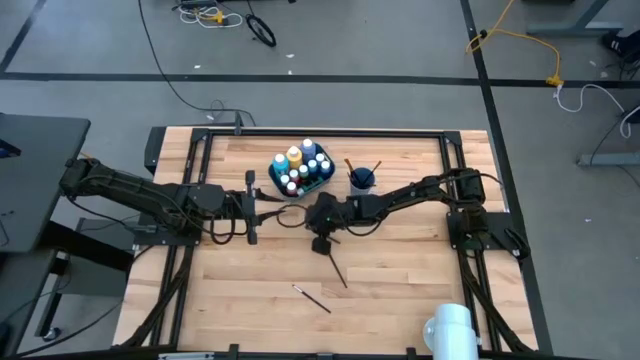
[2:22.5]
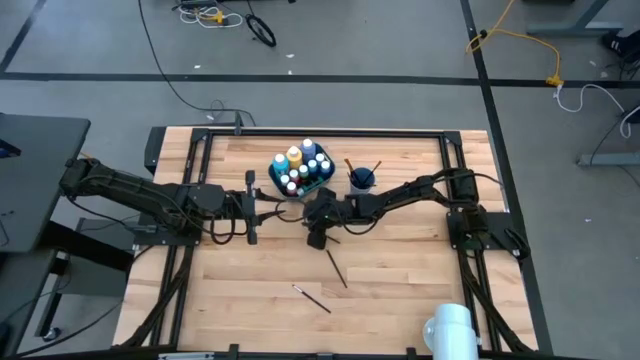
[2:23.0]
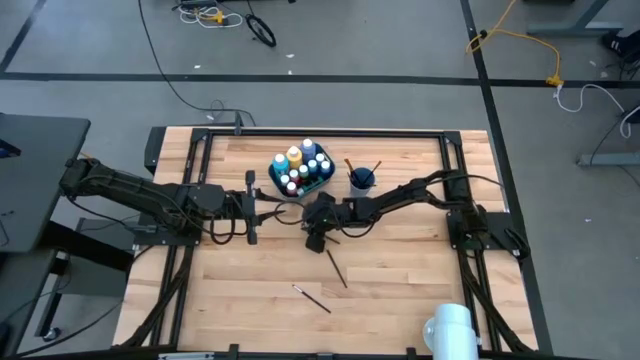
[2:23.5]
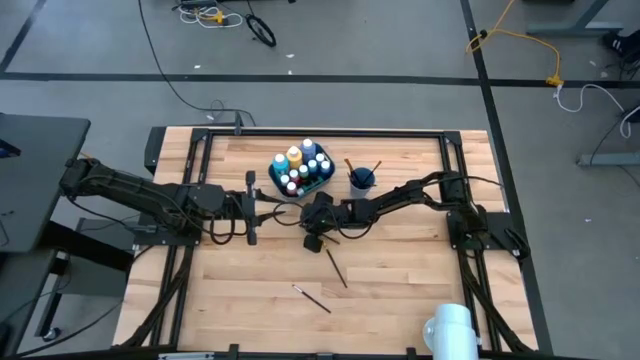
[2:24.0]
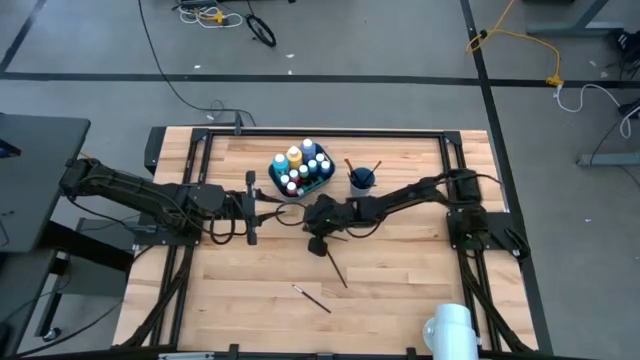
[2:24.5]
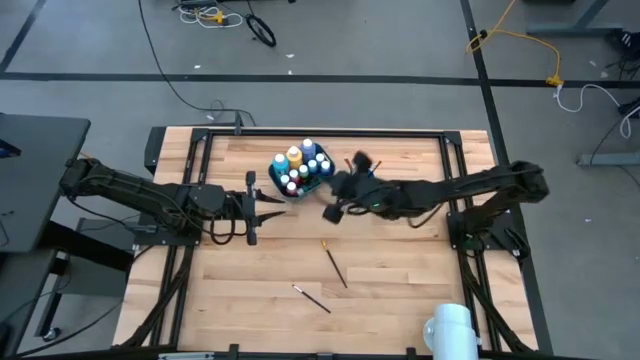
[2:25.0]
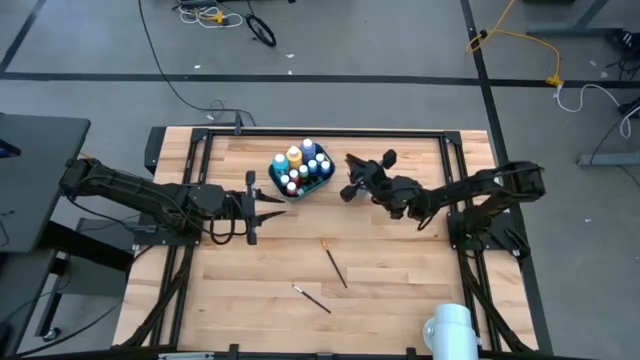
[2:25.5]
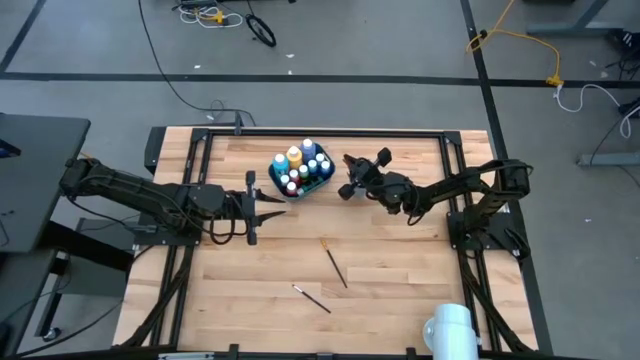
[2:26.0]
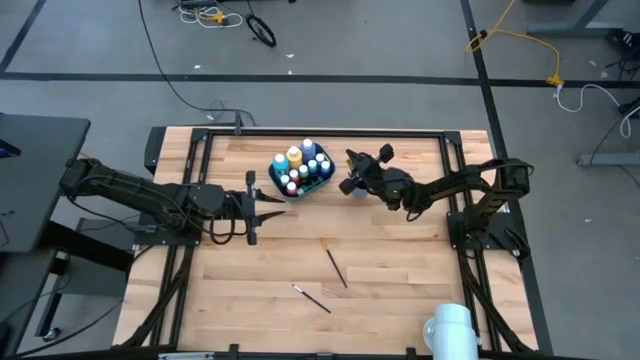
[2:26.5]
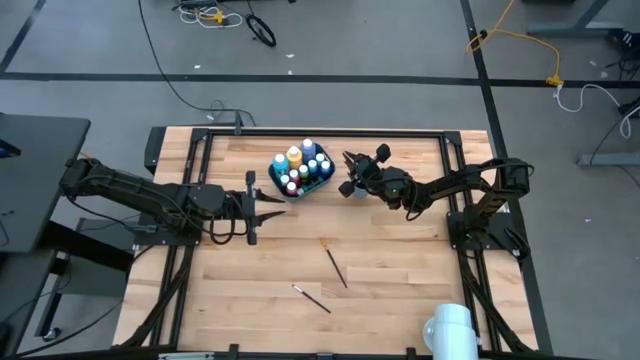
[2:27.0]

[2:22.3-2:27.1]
Task: Pick & Place Paint Supplies
Put the silver paint brush into the blue cup

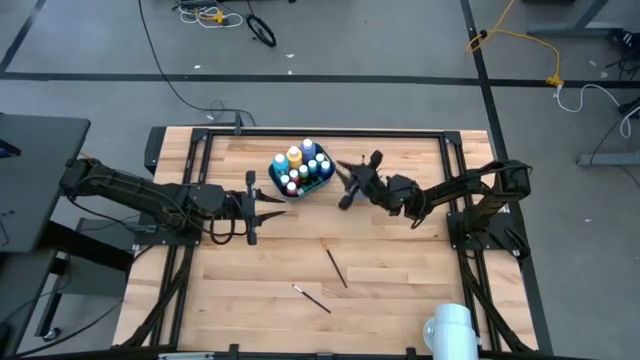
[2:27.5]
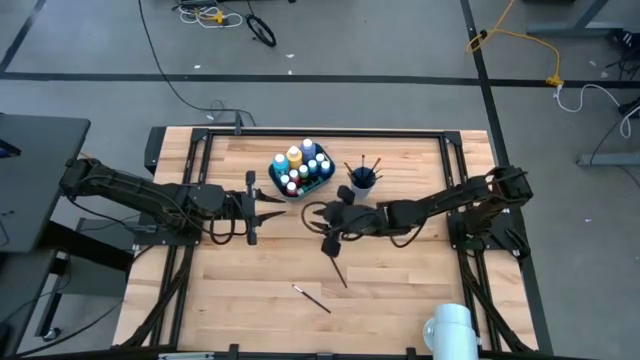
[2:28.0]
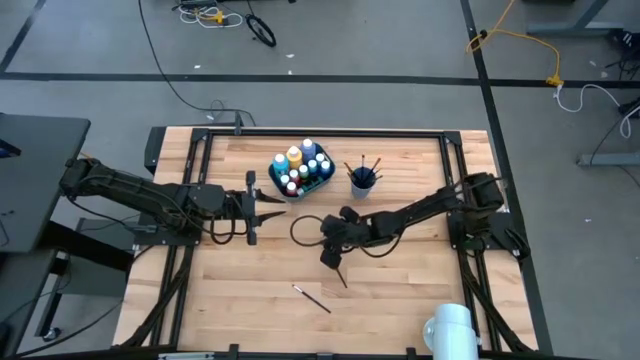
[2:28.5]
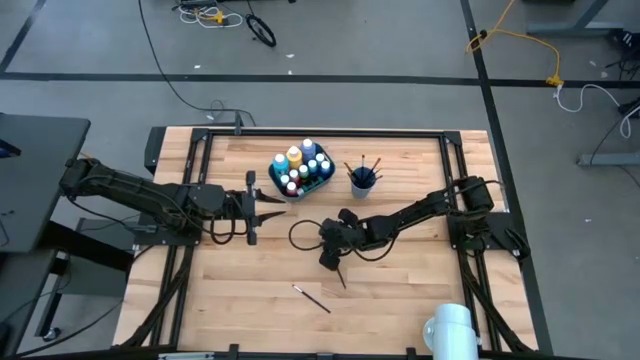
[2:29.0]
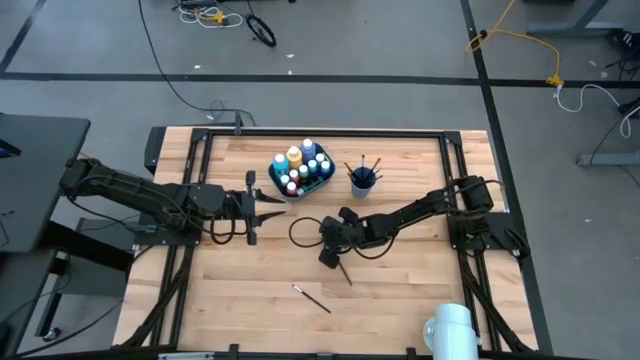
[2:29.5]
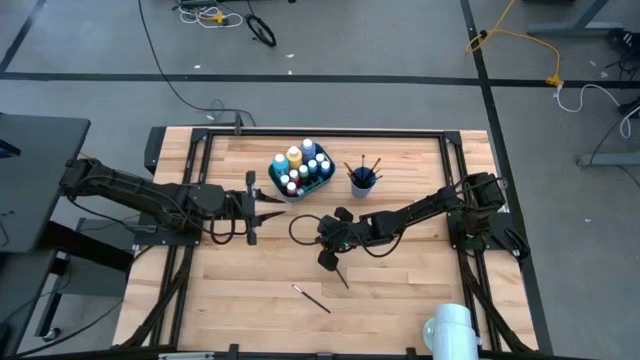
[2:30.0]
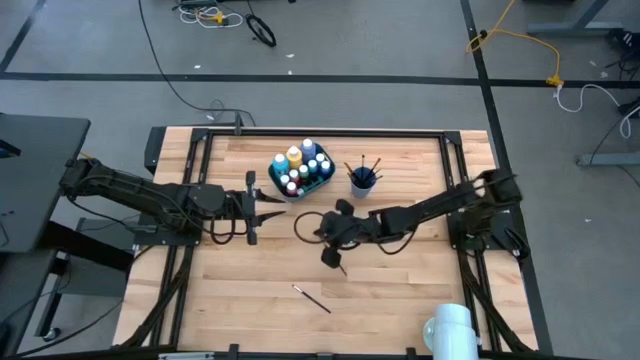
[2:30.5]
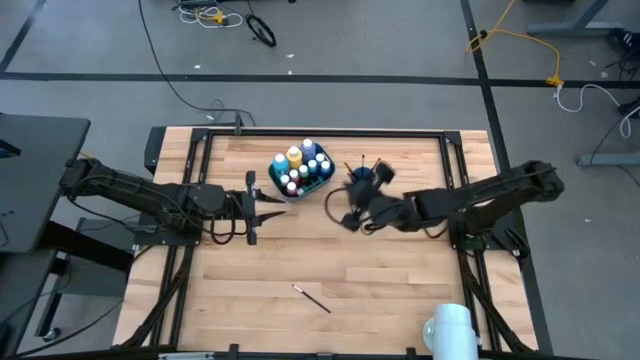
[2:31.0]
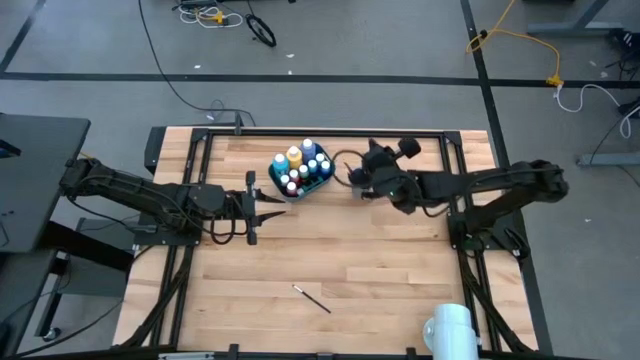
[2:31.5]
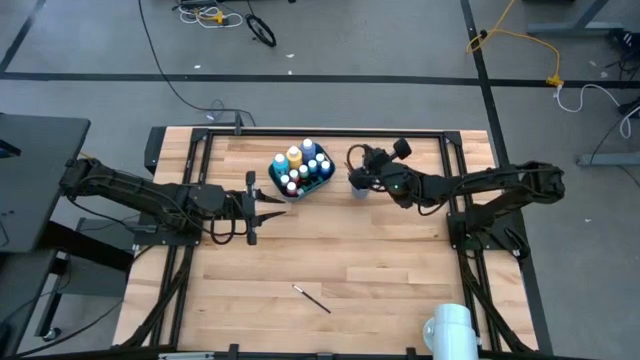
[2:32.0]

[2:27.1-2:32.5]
Put the orange paint brush into the blue cup

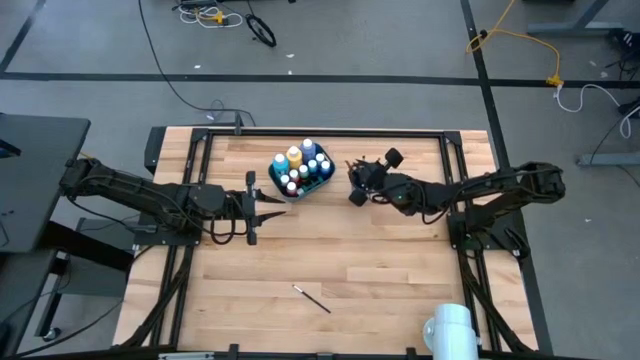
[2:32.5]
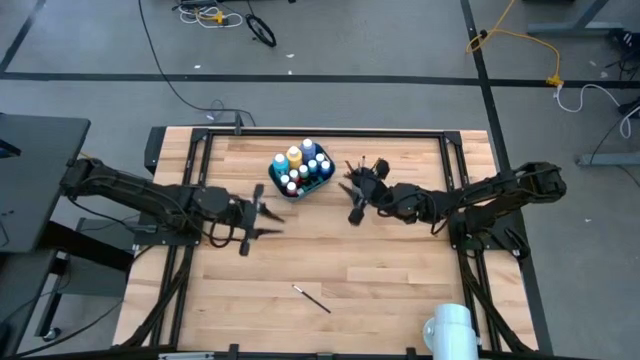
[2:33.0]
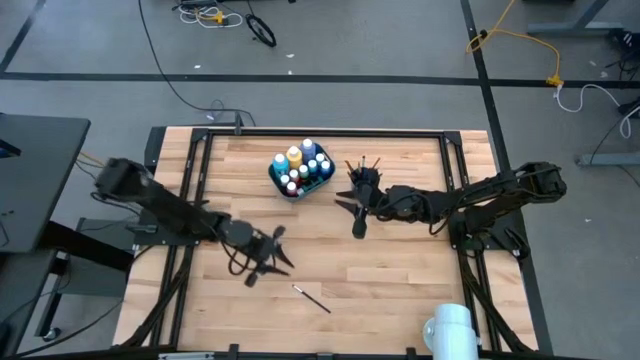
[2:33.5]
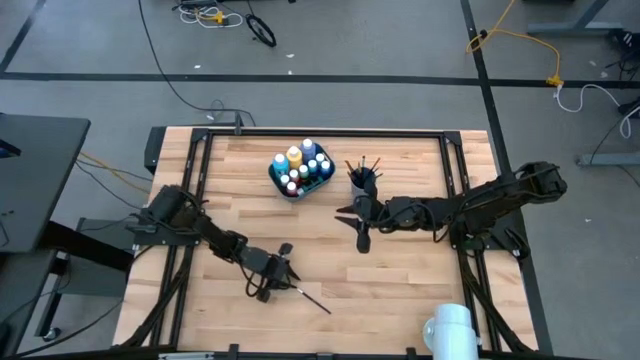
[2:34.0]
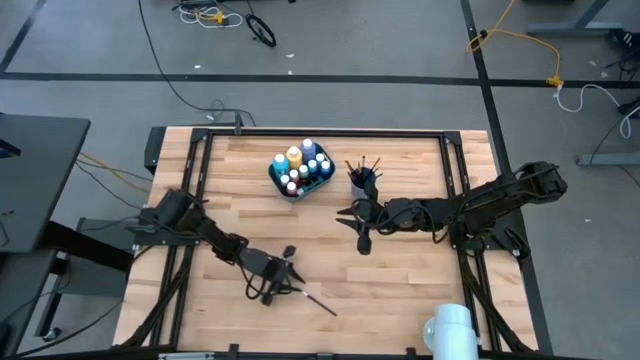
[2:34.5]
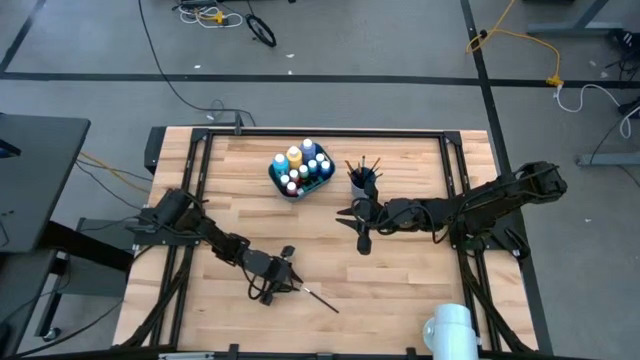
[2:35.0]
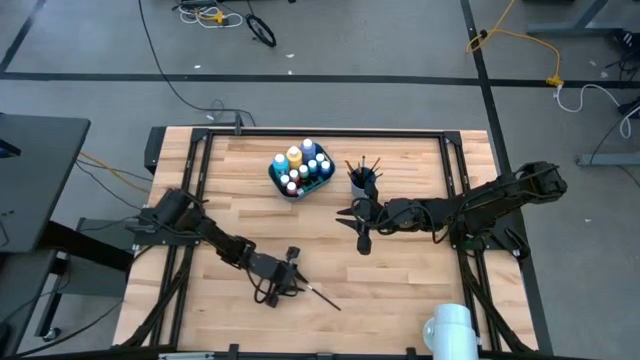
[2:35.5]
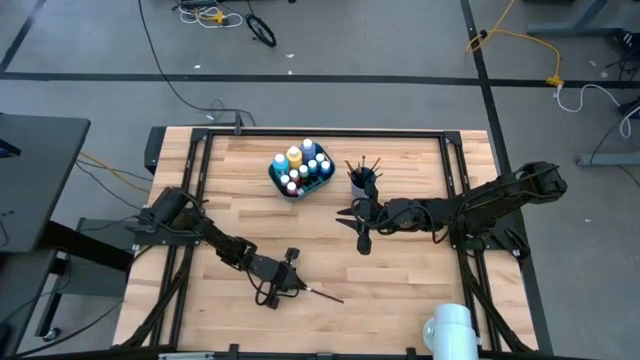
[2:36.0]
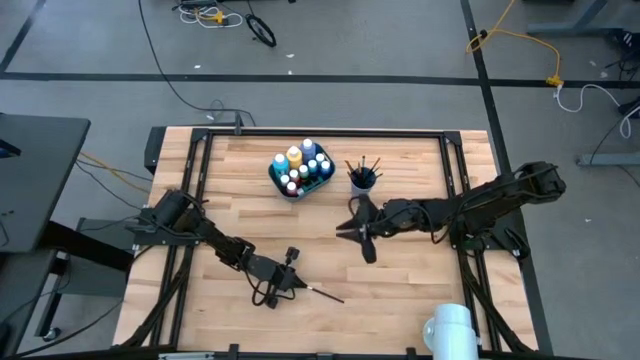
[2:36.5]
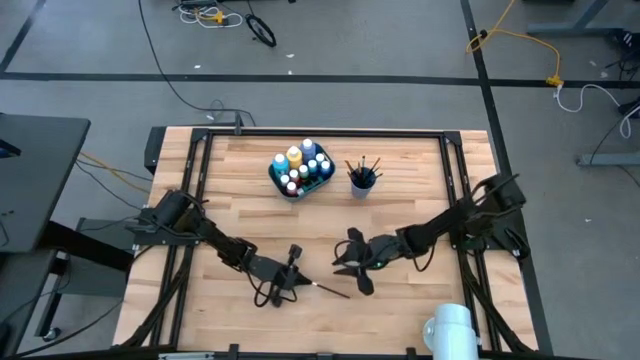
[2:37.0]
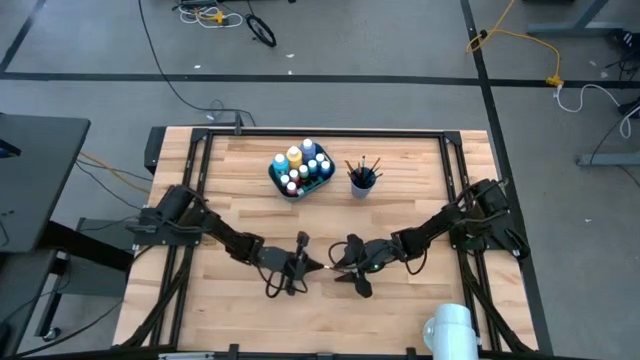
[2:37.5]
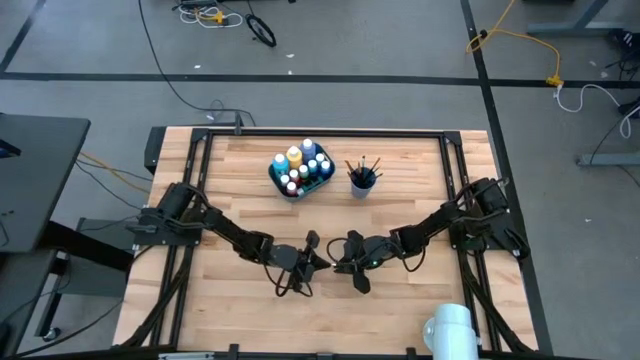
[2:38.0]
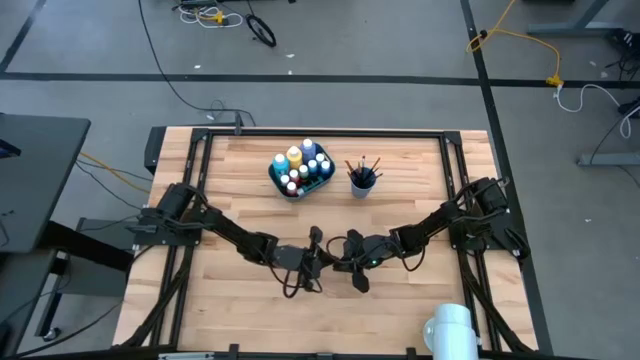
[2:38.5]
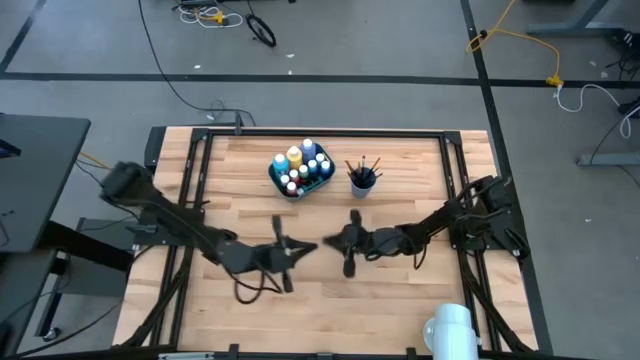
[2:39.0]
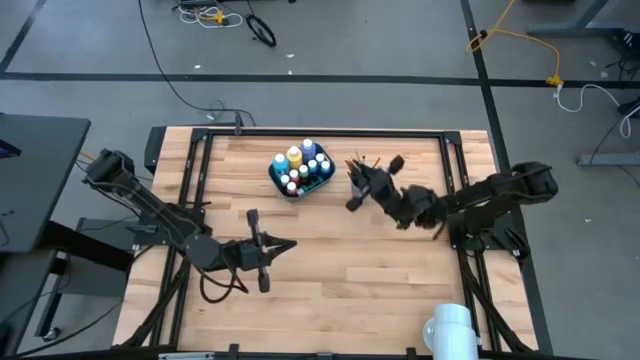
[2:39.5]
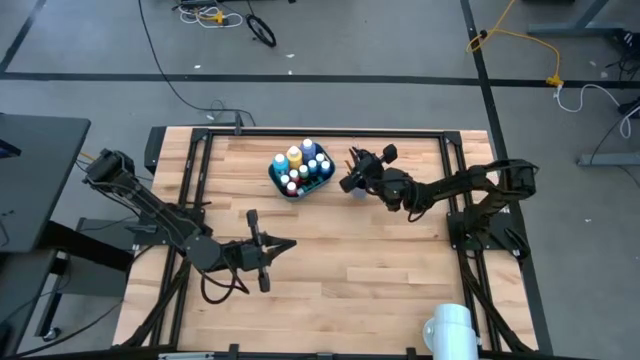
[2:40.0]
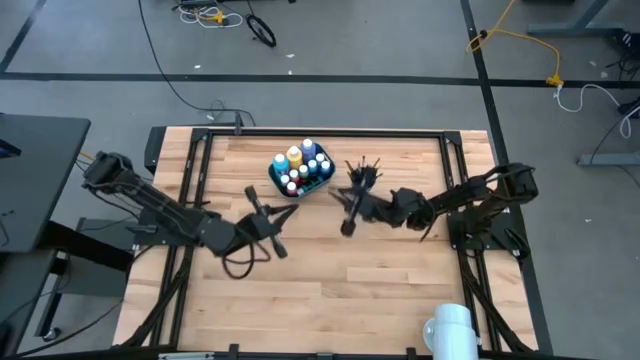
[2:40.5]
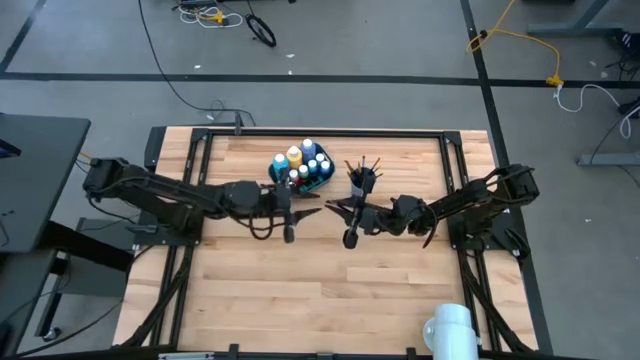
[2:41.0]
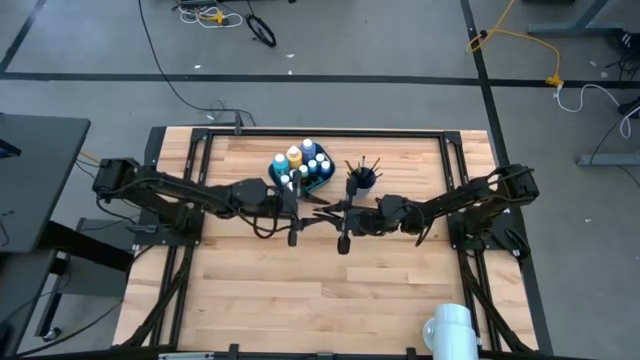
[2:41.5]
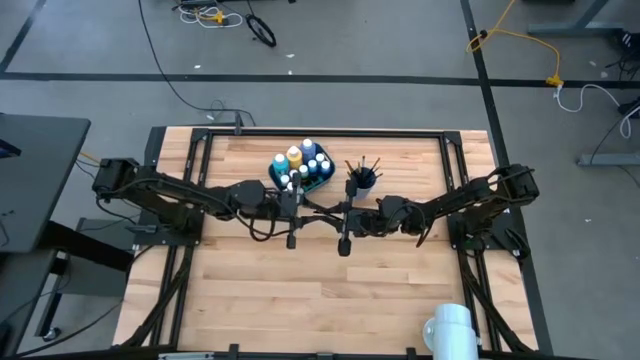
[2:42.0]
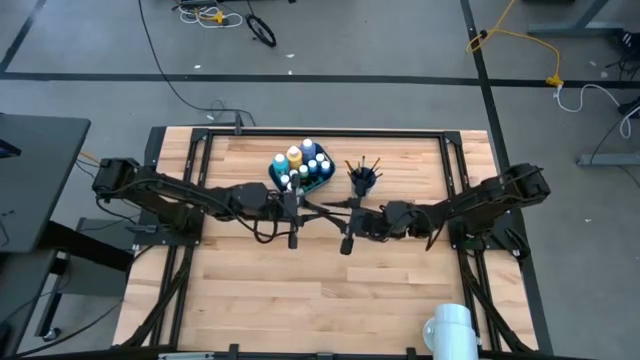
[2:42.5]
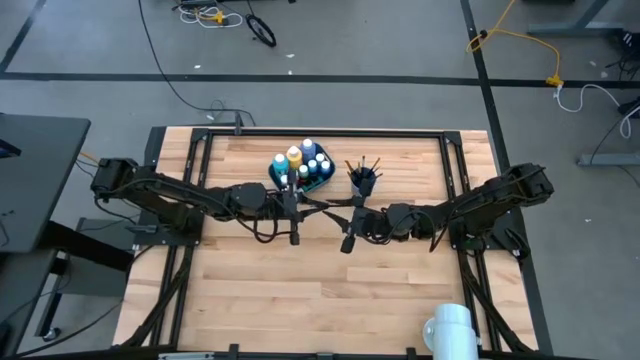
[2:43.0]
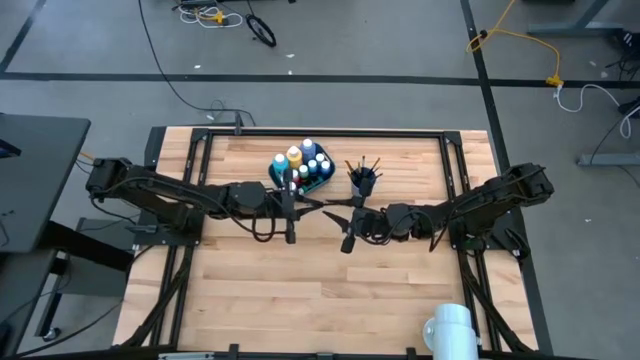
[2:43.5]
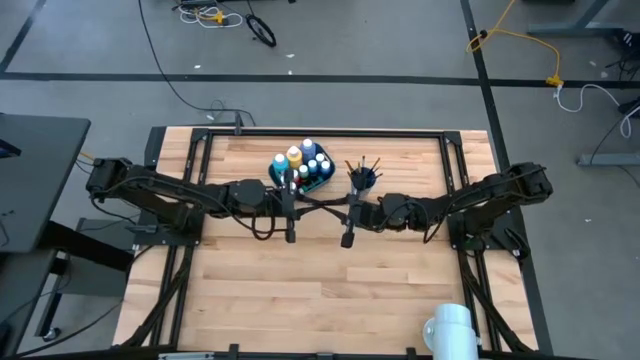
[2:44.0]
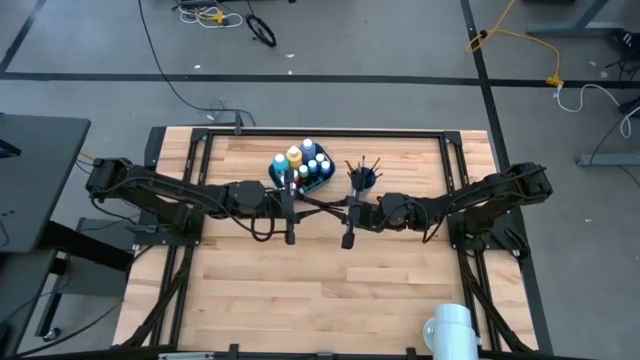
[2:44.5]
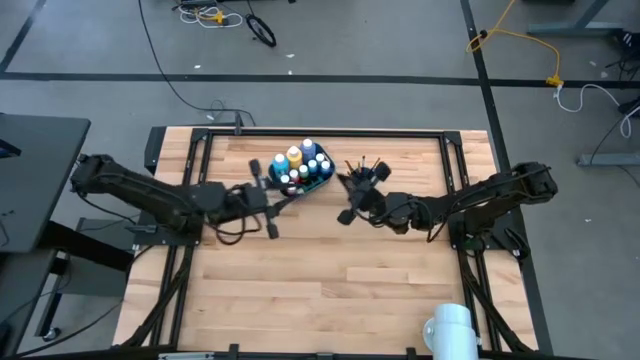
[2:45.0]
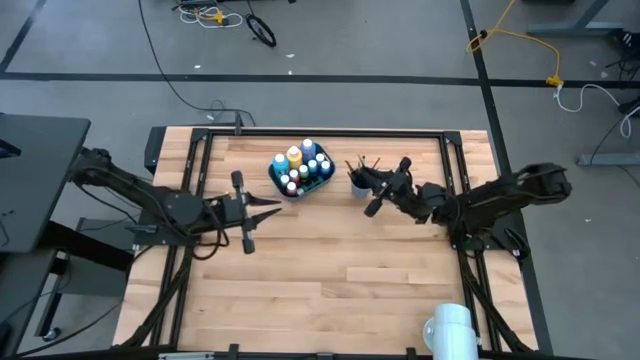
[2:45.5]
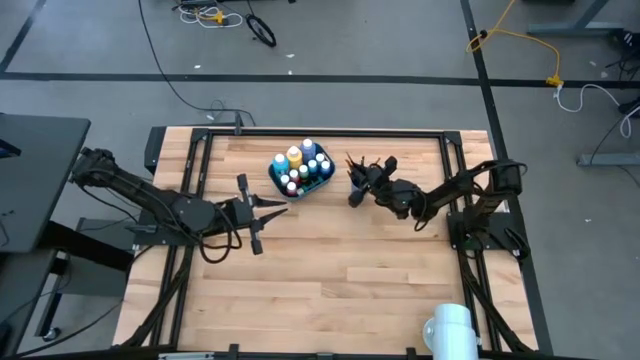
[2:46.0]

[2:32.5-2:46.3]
Put the silver paint brush into the blue cup
